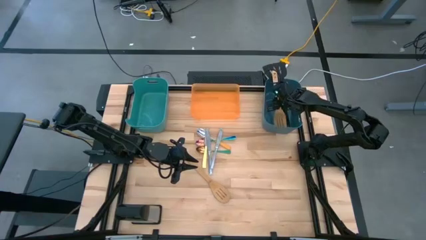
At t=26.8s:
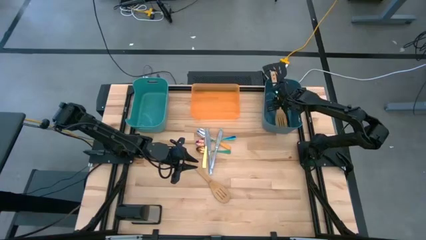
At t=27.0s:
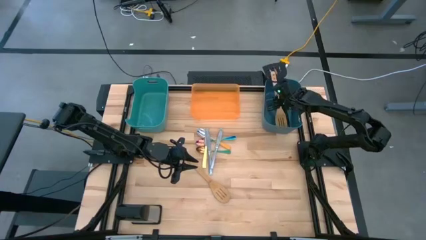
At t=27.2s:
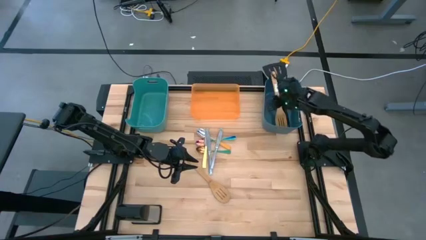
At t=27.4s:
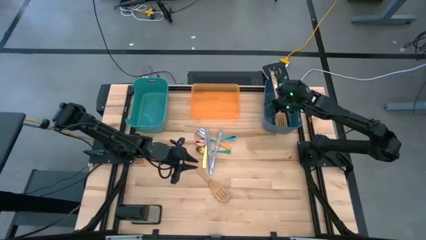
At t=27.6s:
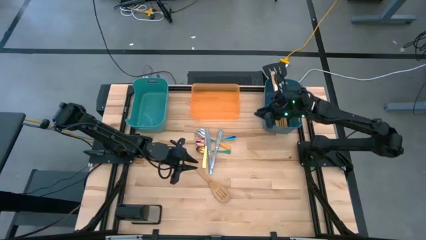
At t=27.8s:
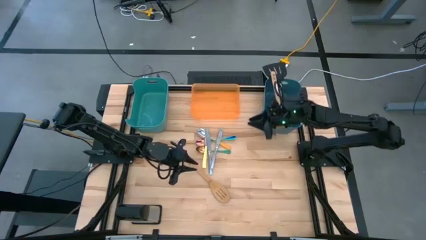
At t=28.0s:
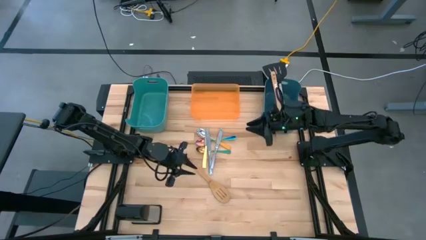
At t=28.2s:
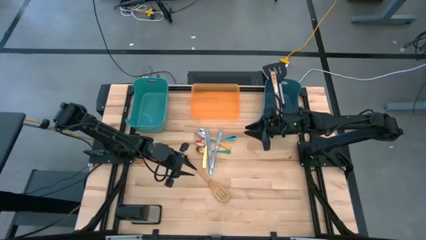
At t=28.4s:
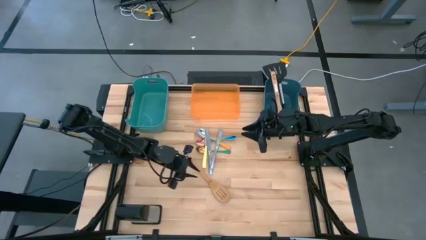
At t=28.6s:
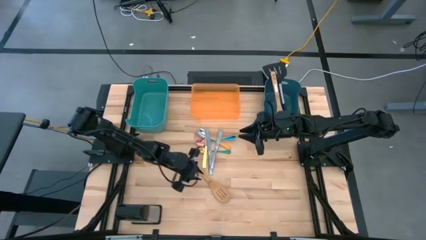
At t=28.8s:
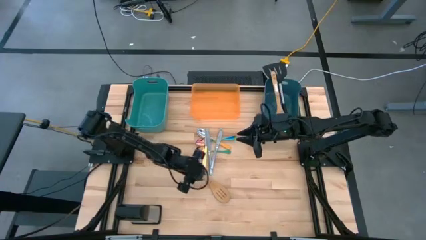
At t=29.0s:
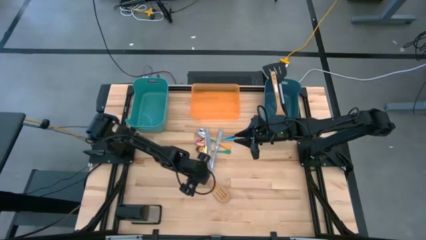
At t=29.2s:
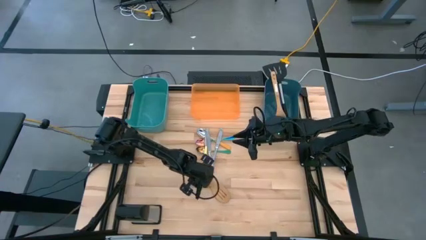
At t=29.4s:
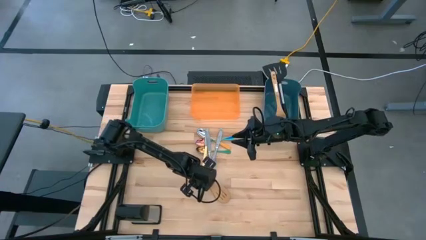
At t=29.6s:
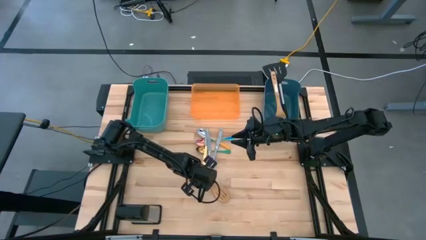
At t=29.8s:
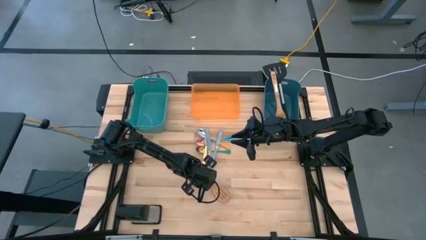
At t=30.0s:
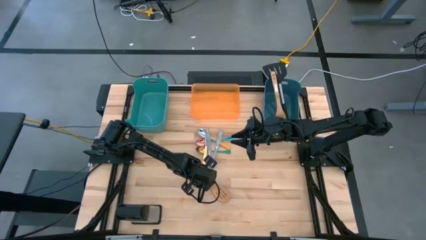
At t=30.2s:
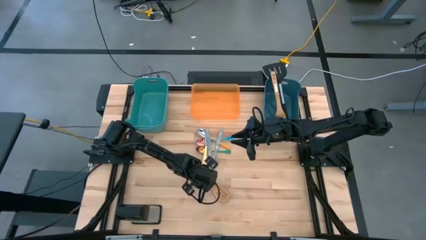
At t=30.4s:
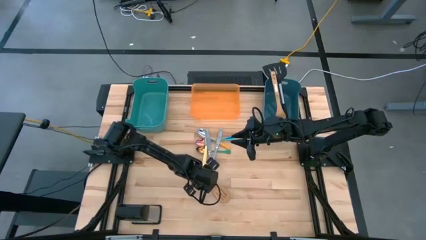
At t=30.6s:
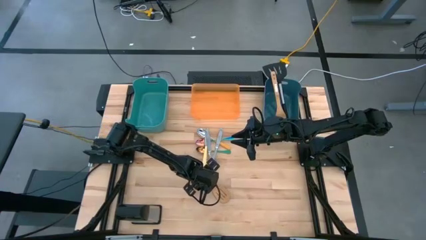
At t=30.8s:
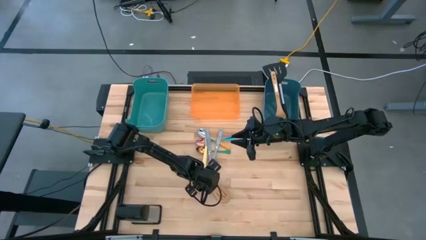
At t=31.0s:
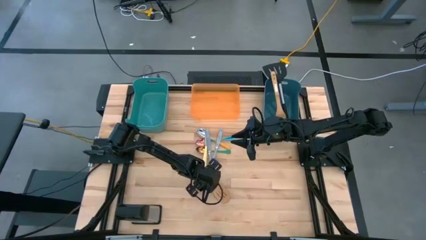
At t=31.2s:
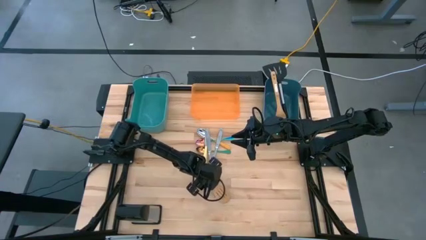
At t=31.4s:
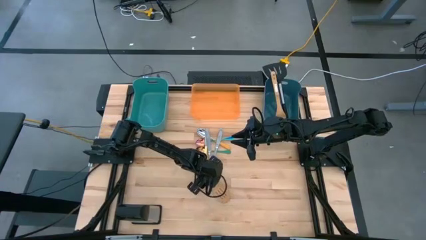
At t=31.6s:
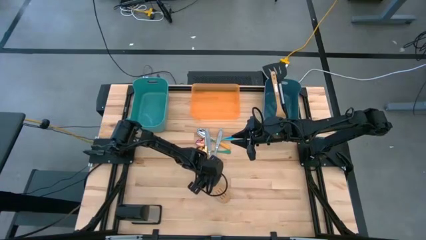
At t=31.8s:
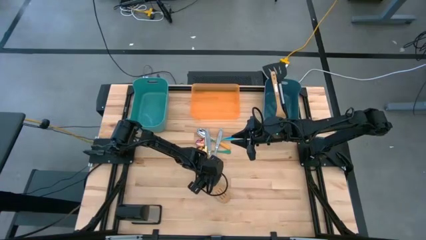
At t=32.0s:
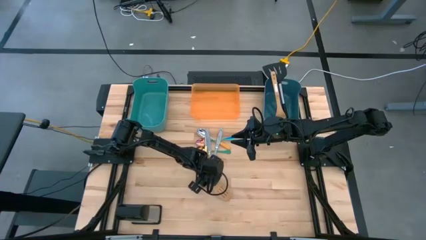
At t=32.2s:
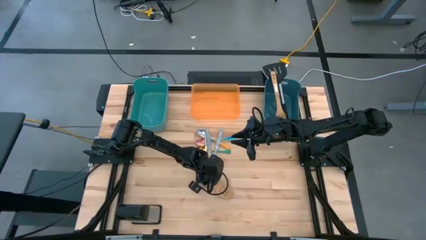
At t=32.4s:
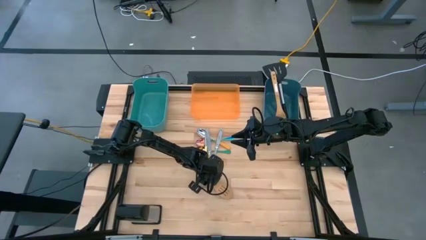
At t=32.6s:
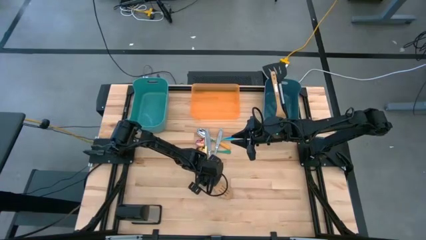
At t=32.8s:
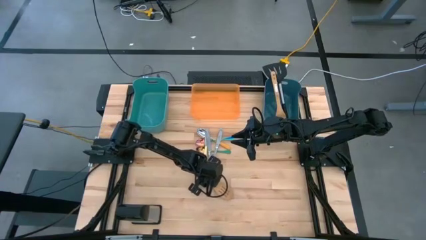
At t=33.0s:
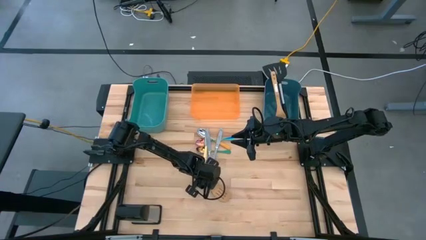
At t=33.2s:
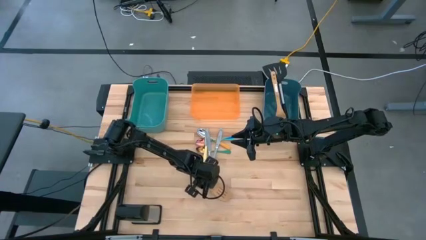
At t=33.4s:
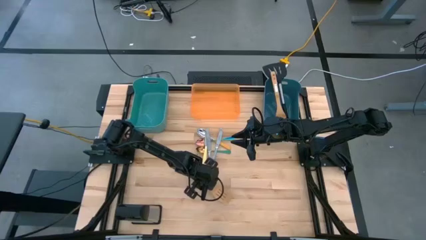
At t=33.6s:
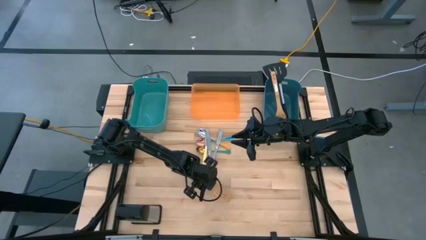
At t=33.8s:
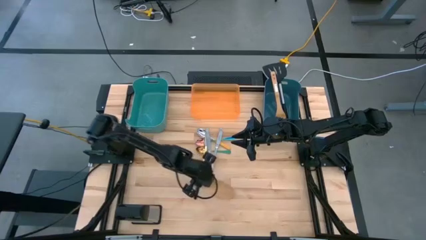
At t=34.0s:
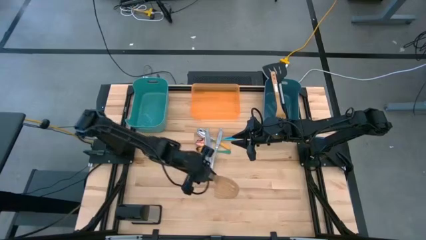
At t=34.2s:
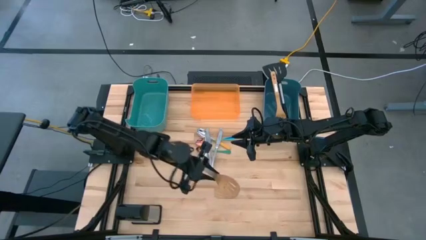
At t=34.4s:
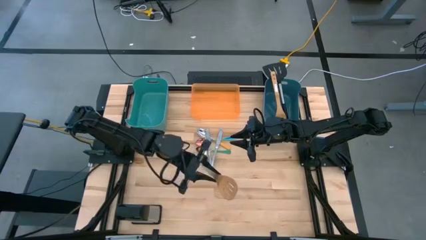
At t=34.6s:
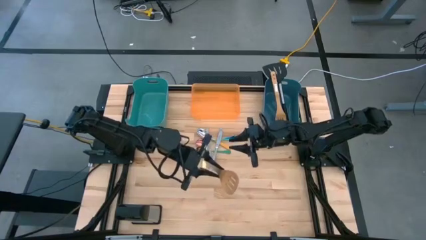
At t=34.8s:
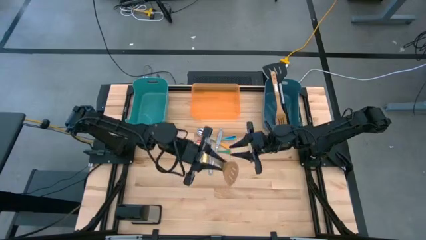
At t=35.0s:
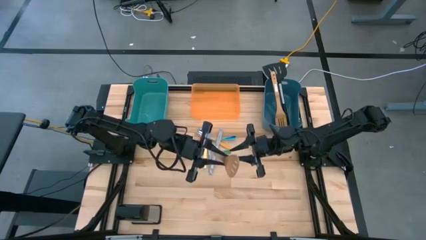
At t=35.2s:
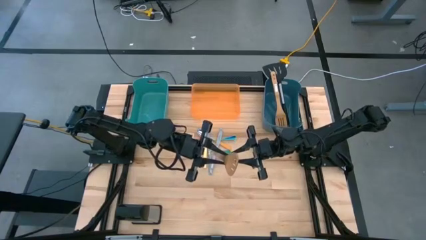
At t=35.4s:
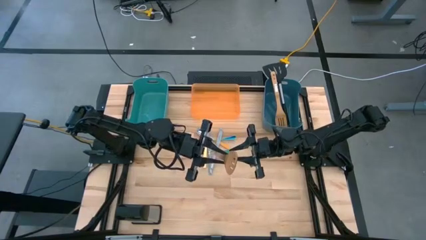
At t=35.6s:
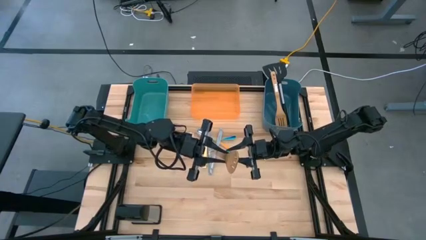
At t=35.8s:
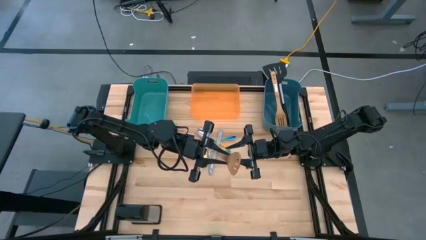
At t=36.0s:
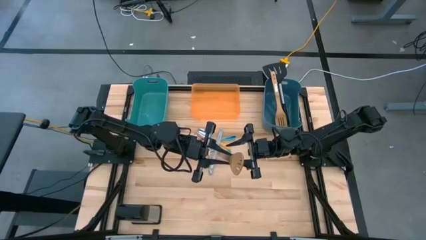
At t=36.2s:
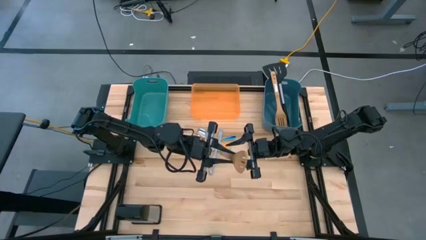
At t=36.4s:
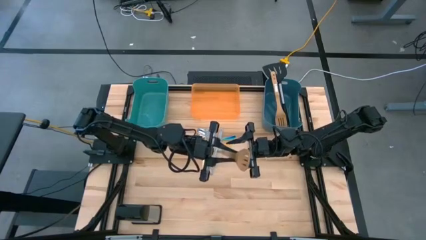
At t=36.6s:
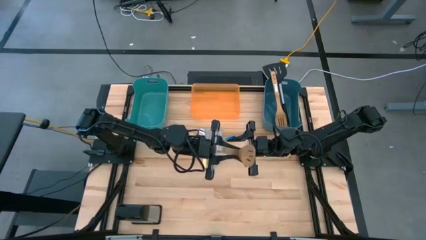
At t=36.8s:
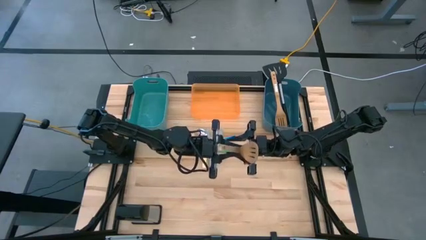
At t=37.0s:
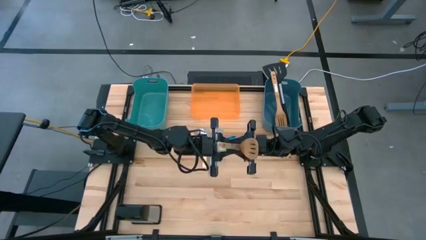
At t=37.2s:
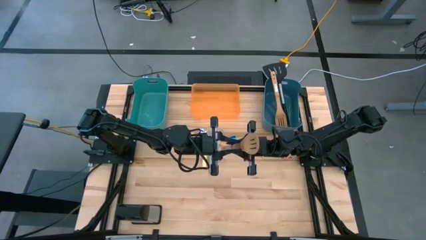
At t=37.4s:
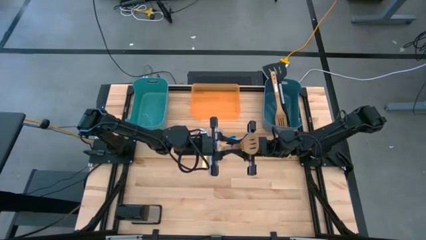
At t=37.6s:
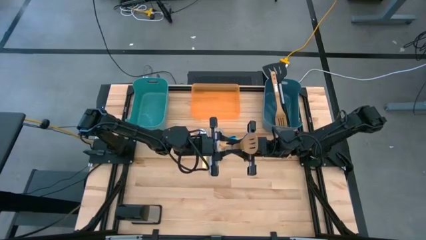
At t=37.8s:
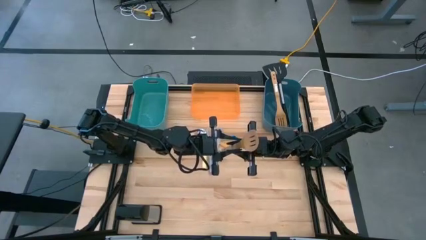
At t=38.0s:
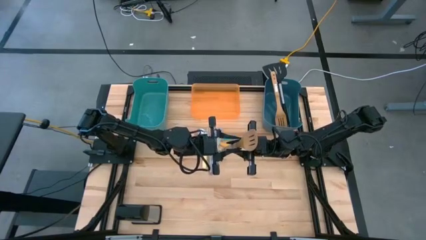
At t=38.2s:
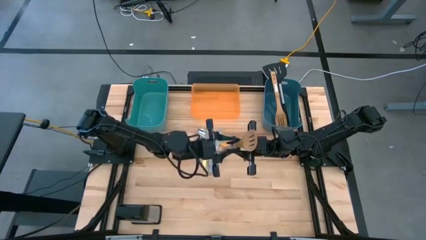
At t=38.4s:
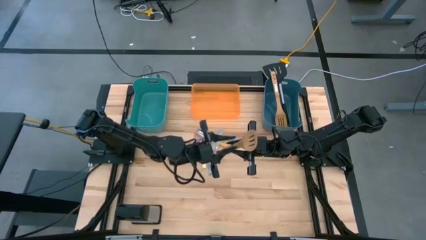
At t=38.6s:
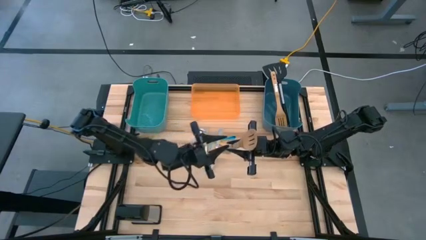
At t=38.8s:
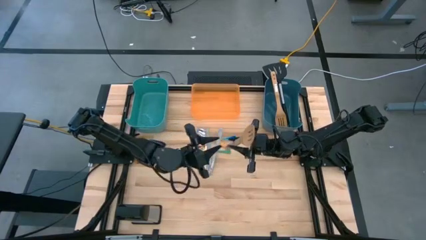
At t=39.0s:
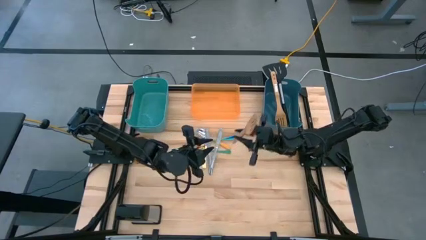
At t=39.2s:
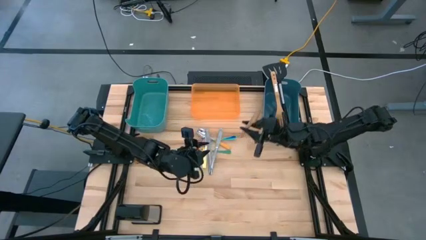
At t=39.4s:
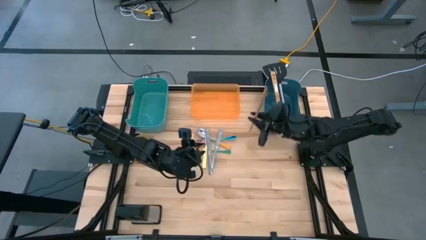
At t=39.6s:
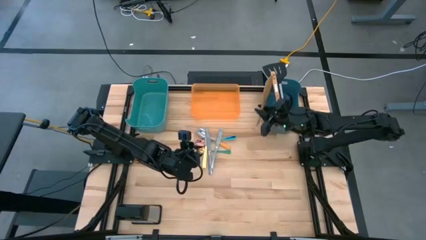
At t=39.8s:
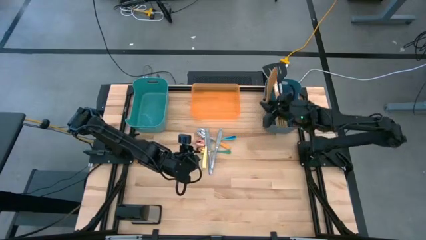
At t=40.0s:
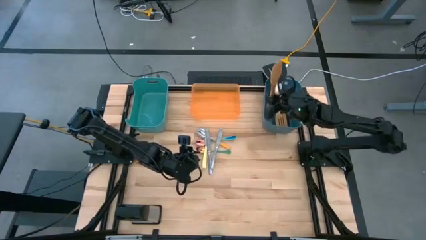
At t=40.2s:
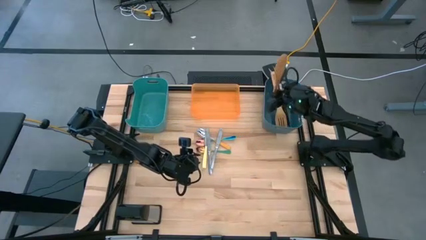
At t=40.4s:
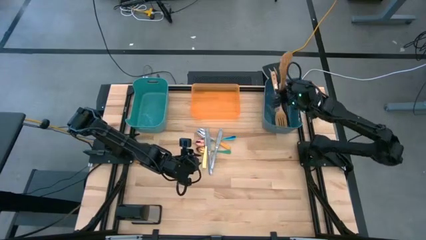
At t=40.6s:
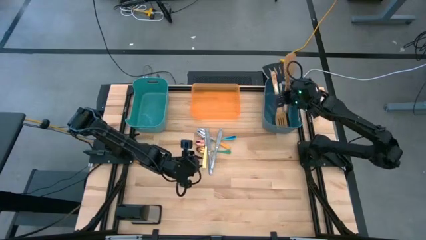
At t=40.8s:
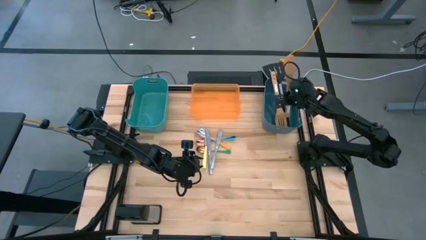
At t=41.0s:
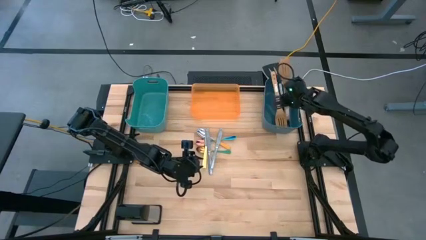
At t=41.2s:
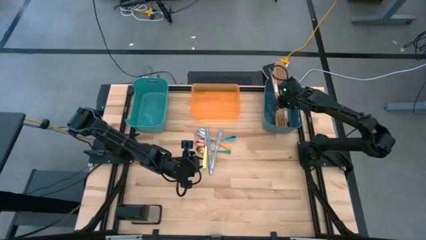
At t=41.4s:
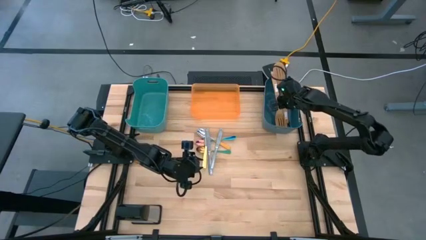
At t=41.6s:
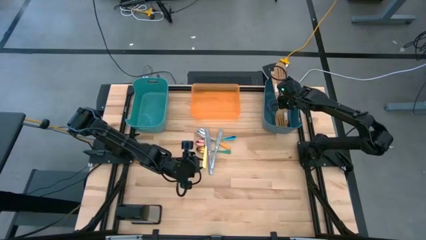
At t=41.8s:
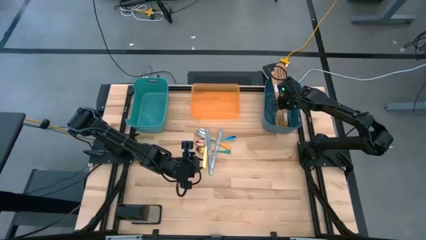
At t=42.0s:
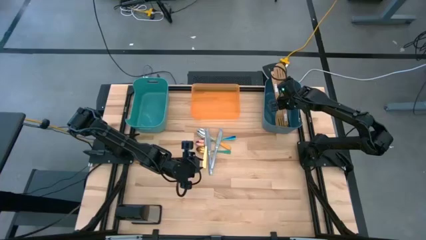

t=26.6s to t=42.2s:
Task: Pick & Place Kitchen Items
Put the brown spoon into the blue bin
